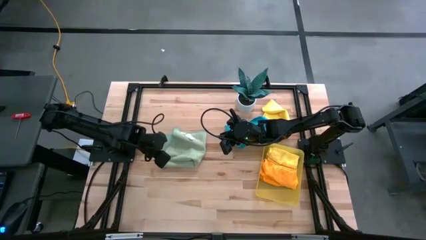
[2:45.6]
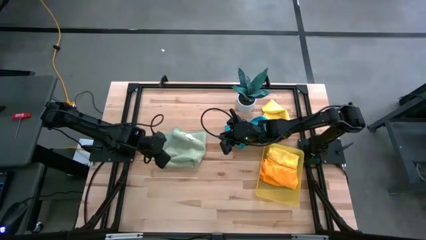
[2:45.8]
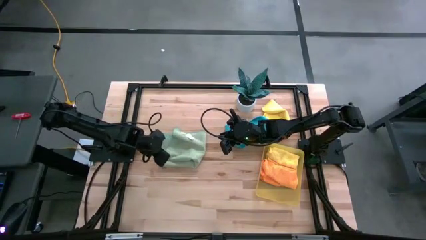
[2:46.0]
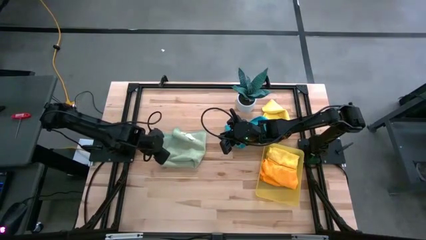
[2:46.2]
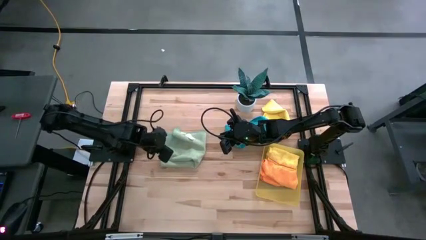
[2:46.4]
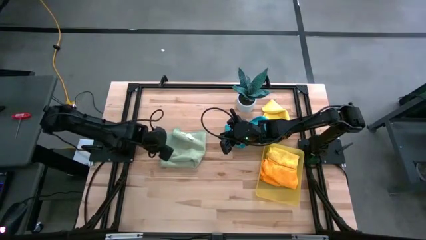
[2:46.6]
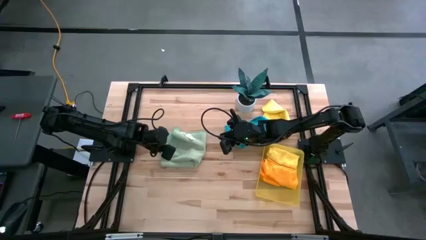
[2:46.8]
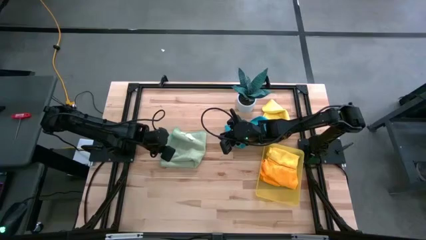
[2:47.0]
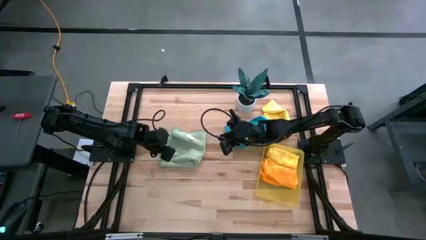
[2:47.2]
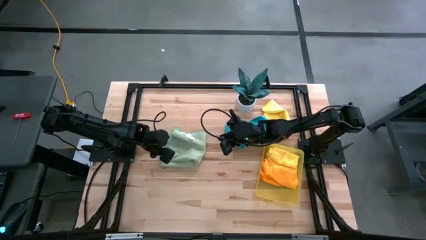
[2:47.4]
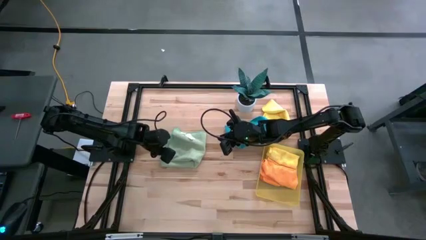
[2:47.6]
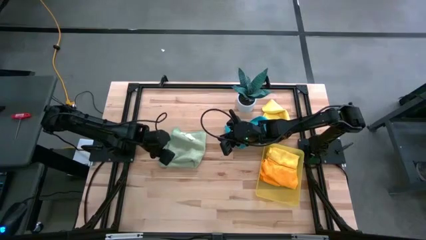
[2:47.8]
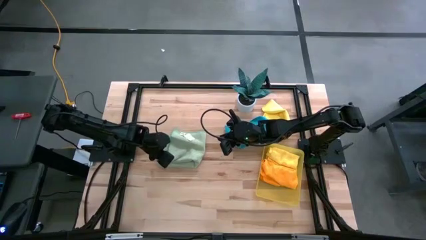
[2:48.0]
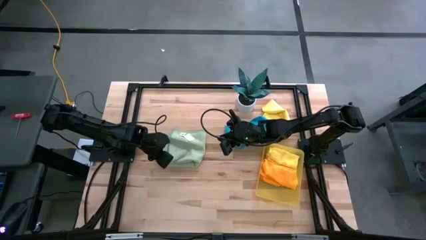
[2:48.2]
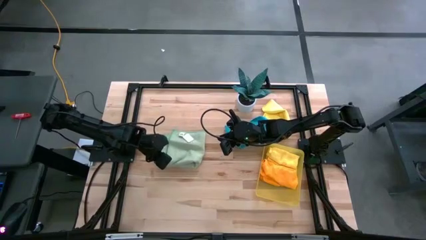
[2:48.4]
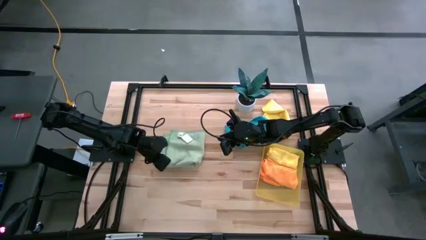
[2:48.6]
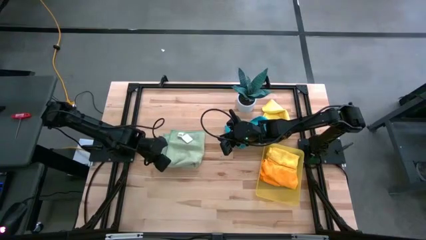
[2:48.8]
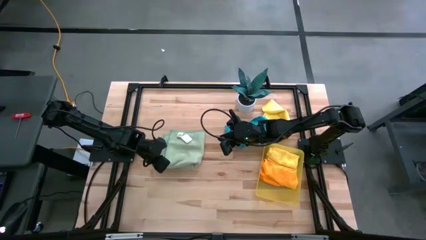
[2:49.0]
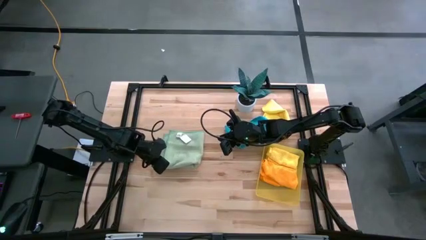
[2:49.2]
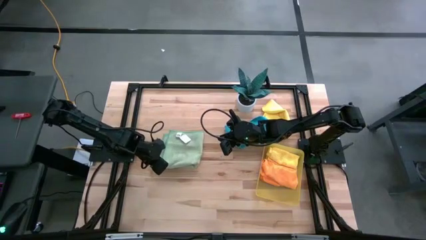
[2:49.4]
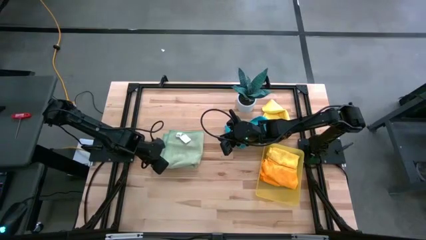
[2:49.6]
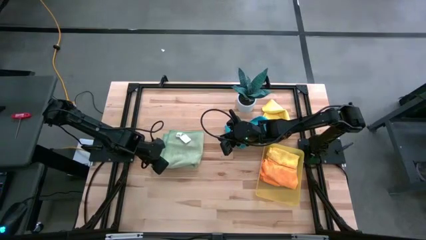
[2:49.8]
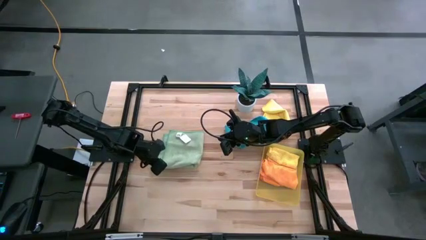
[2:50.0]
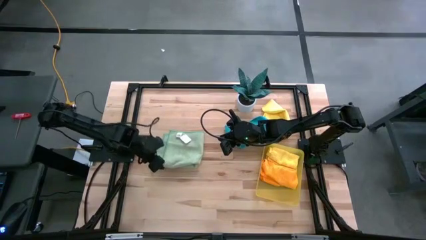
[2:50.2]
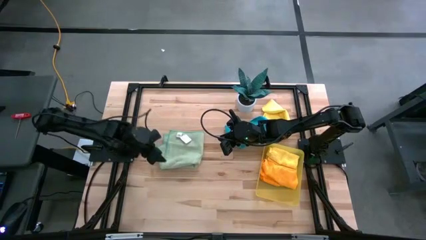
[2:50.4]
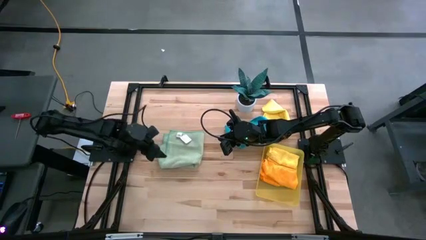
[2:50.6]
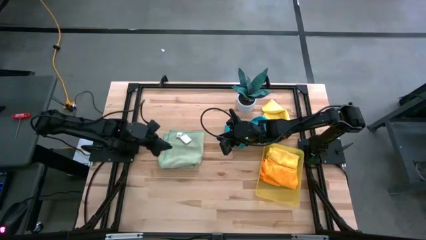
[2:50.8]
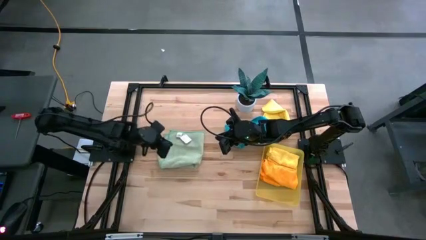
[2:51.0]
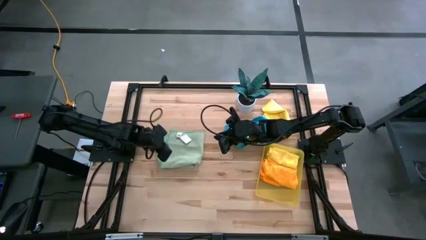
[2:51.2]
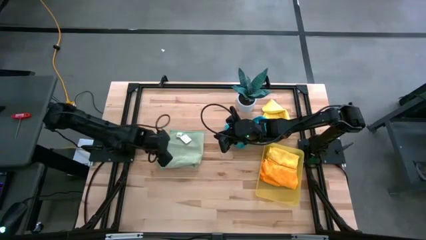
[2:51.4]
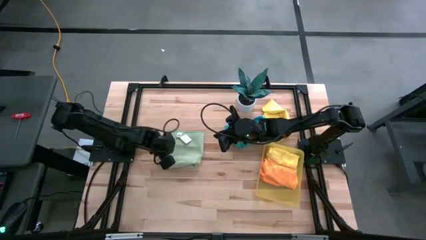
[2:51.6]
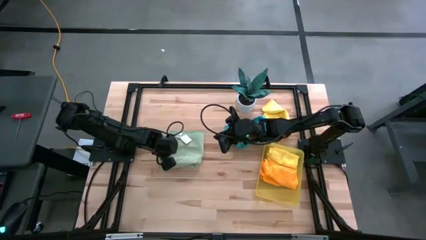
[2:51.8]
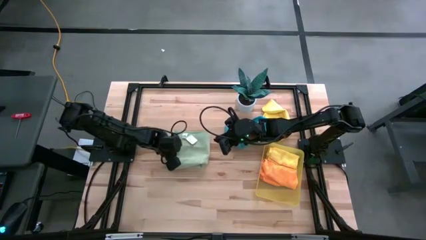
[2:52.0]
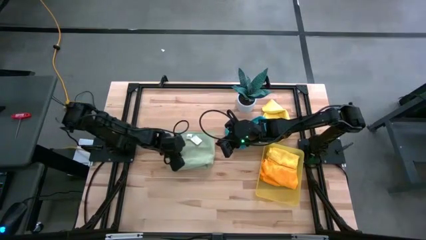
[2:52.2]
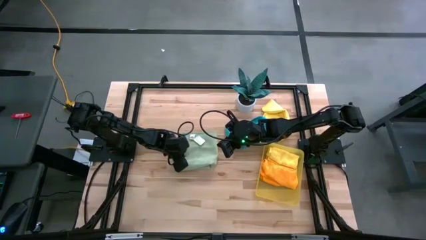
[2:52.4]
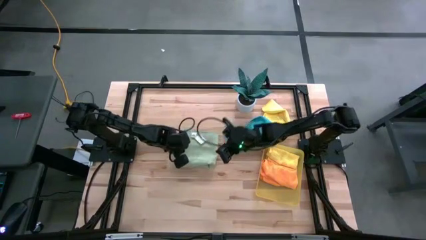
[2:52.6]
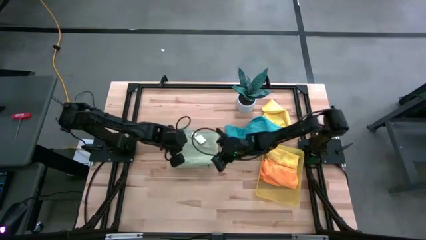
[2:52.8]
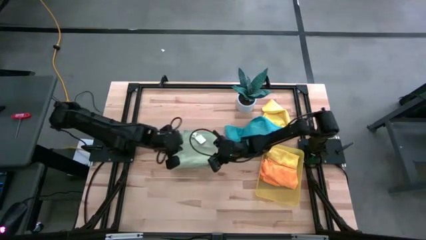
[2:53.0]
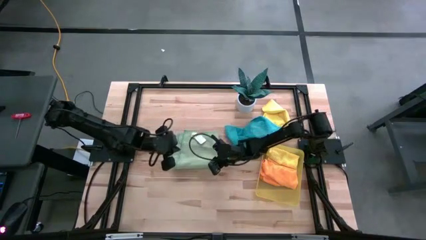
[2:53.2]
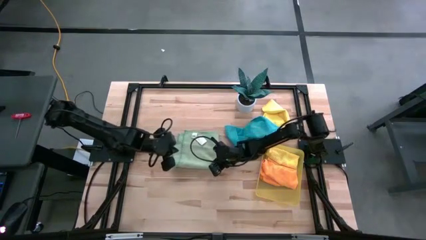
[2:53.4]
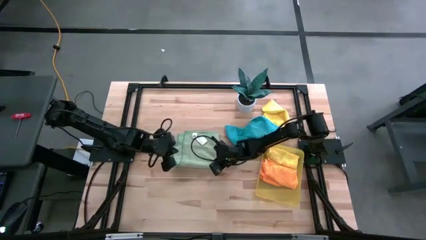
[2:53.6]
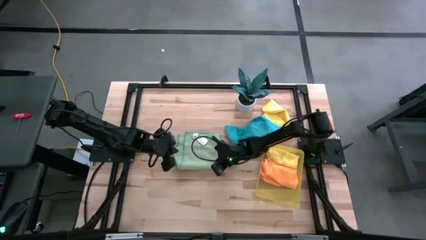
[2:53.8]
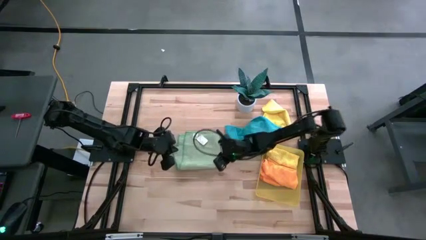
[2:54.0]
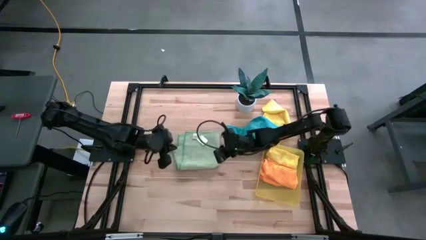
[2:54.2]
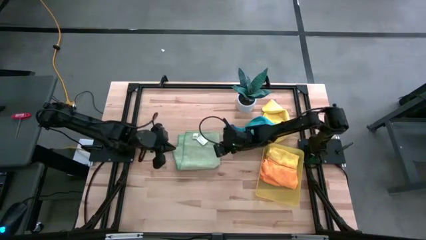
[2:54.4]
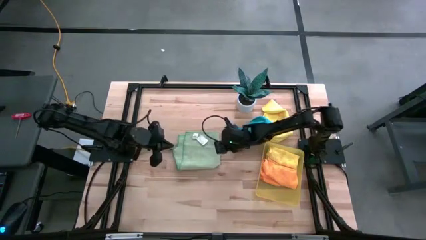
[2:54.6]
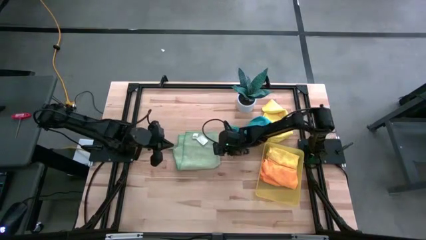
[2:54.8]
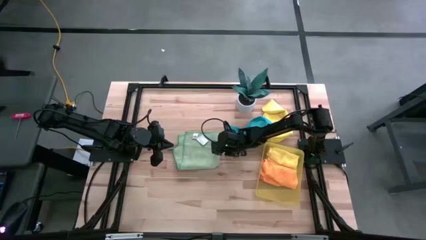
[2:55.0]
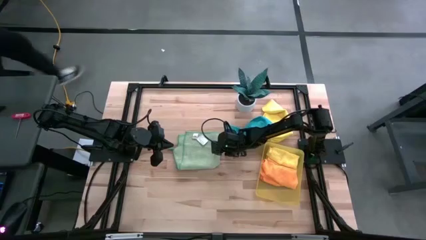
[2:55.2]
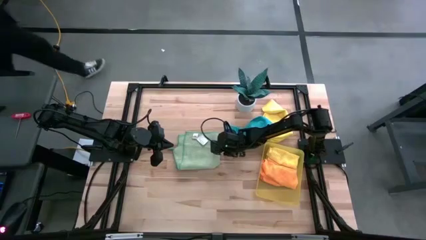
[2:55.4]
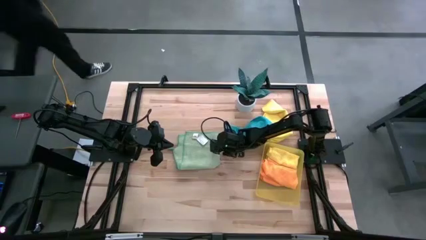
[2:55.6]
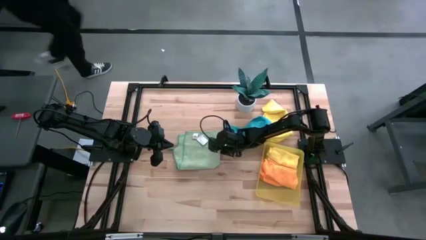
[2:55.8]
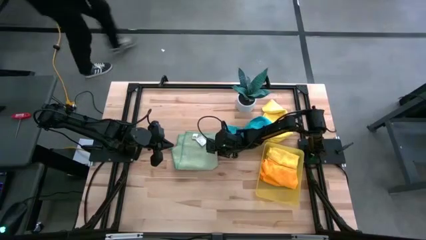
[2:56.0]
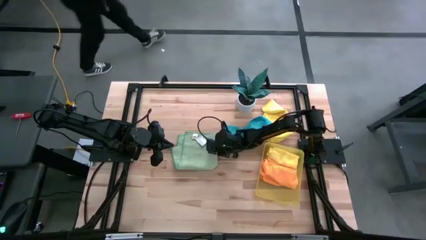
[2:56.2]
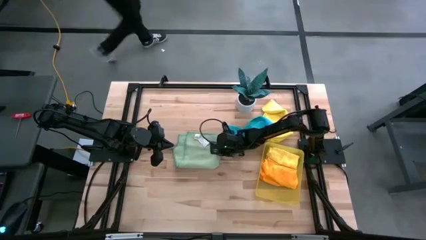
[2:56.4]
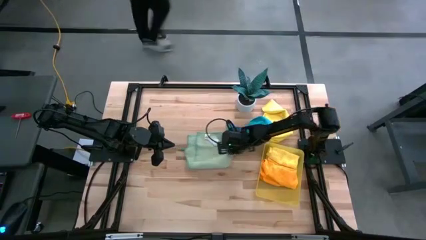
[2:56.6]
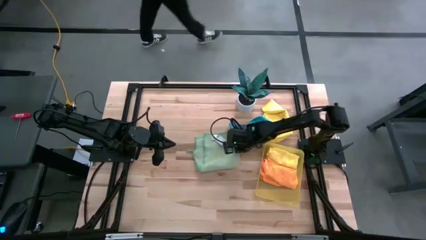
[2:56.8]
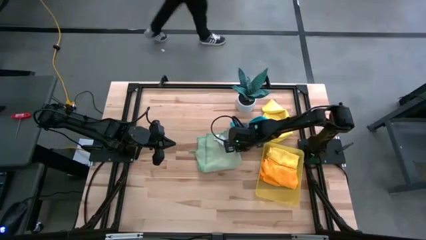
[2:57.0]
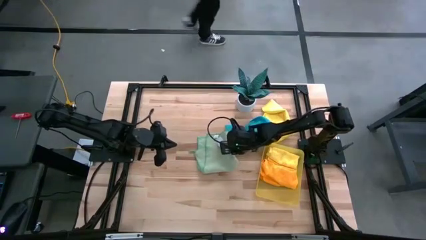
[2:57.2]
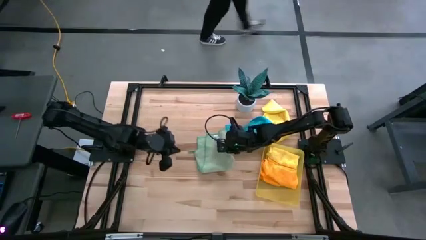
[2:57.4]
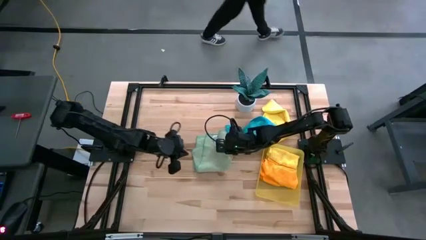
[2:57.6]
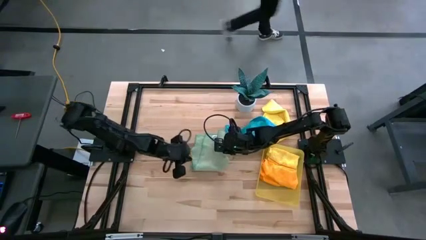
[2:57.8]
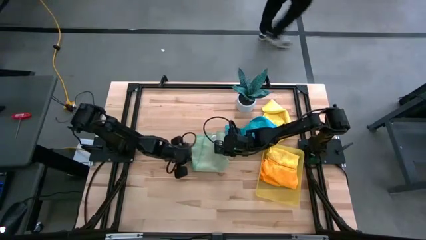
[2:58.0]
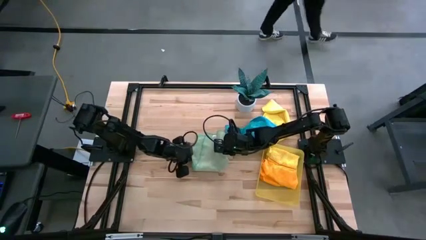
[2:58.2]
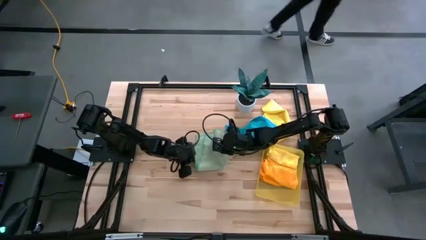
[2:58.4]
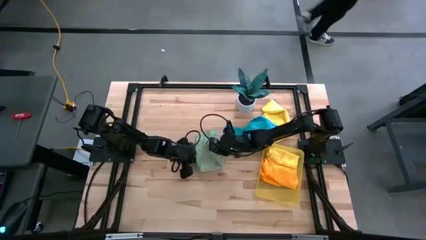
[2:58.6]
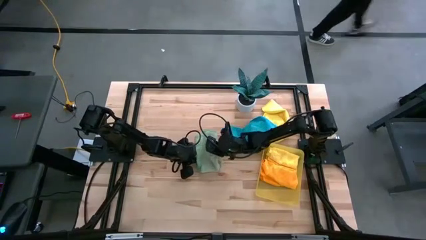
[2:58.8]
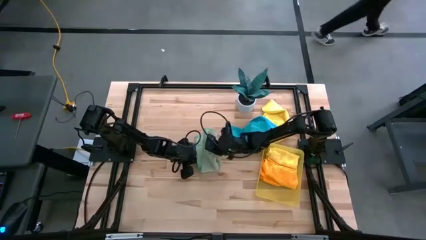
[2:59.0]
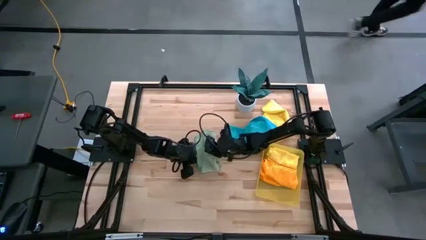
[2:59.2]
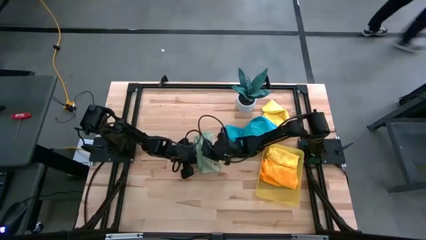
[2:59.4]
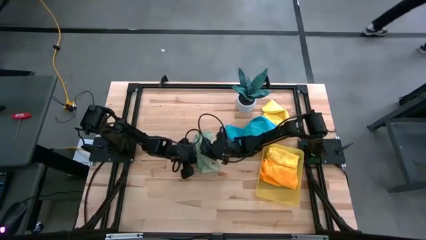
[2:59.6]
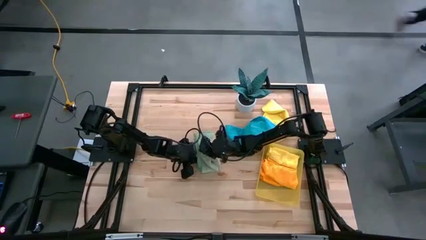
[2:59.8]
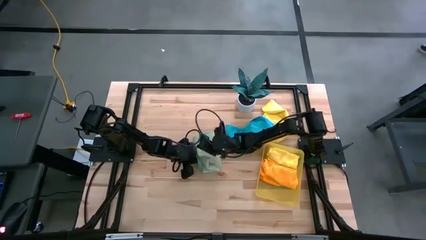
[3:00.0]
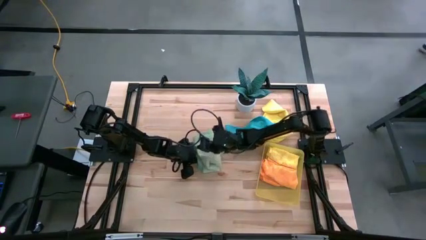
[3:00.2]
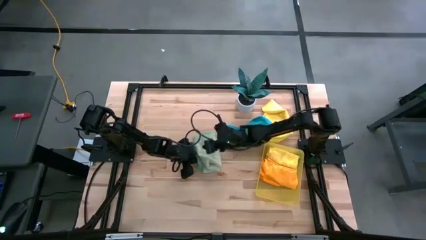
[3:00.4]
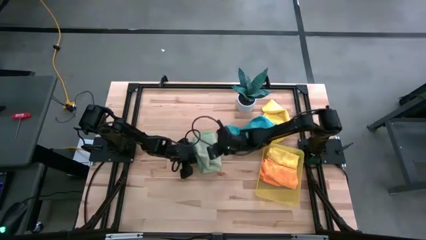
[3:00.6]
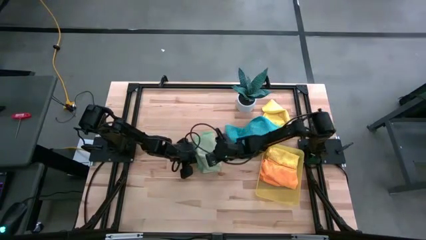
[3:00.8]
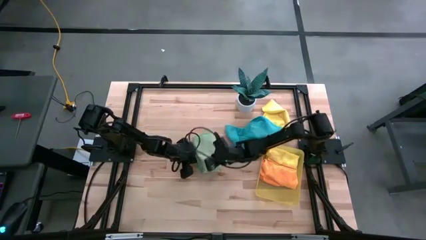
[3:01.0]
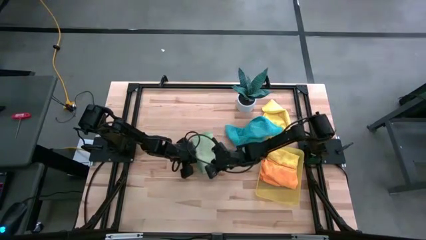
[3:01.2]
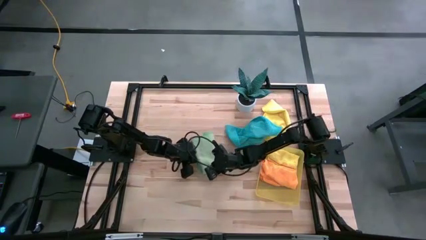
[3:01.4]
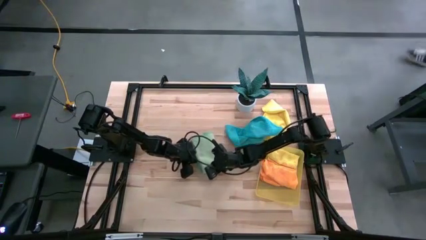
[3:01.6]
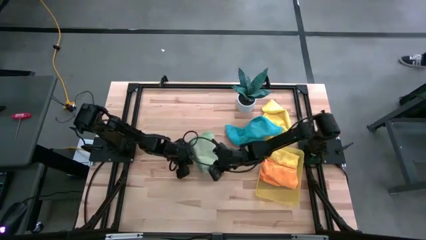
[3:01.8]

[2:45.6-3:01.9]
Task: Fold microfiber towels
Fold the light green microfiber cloth
